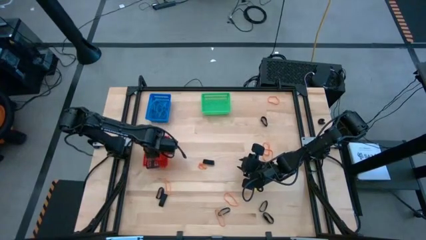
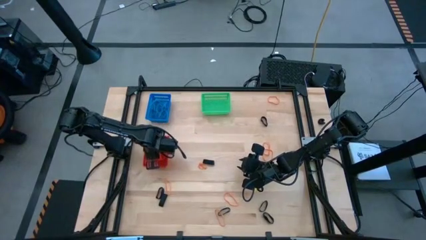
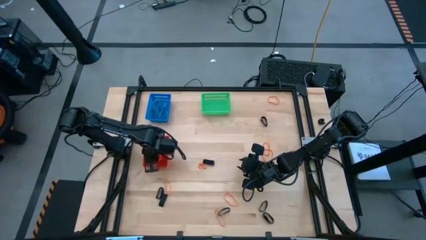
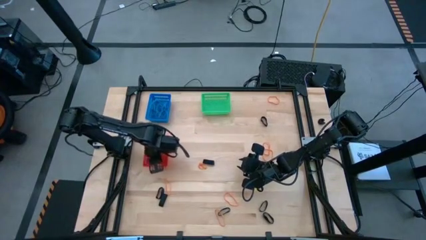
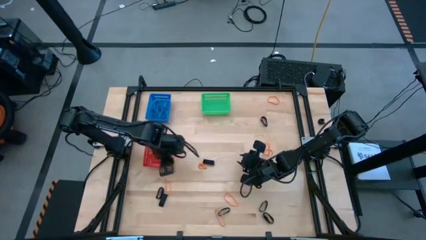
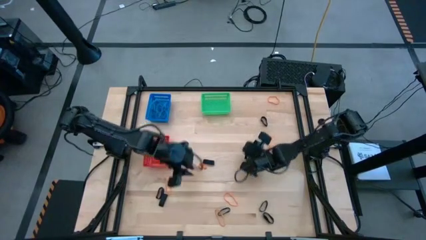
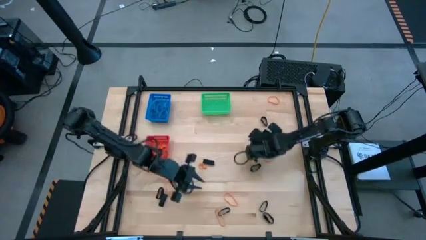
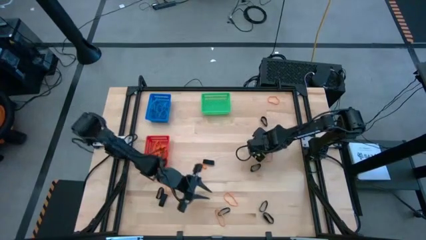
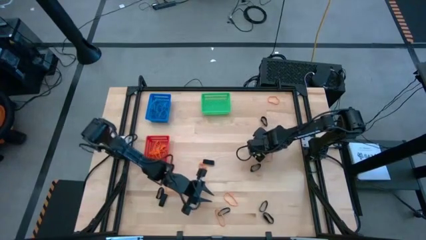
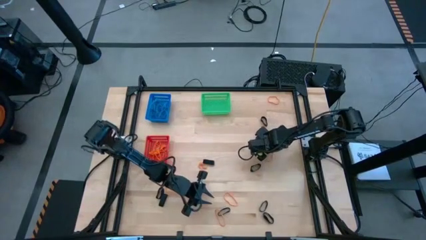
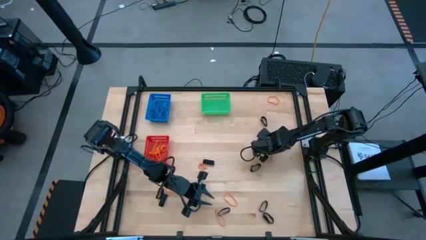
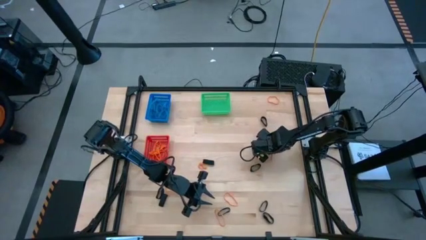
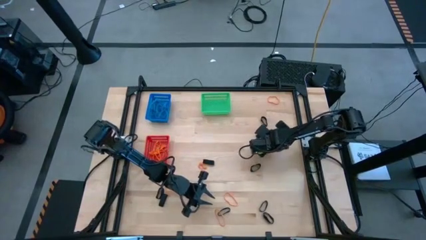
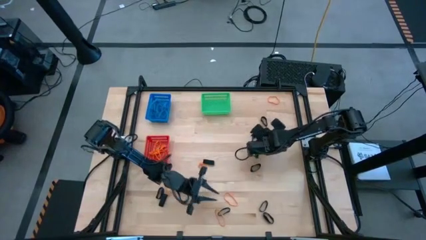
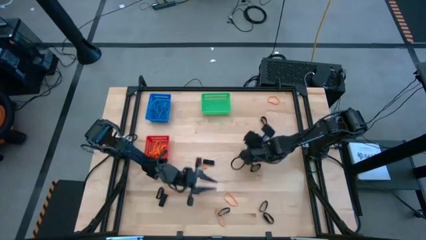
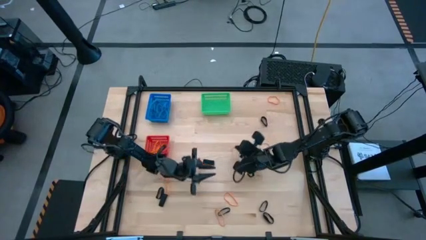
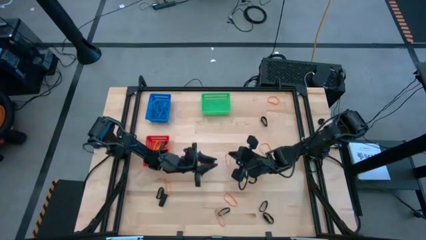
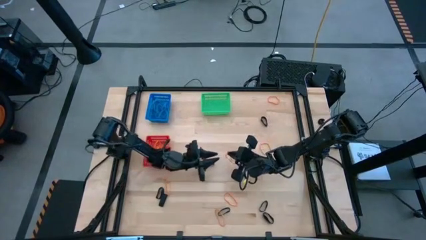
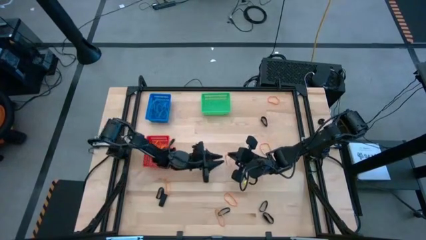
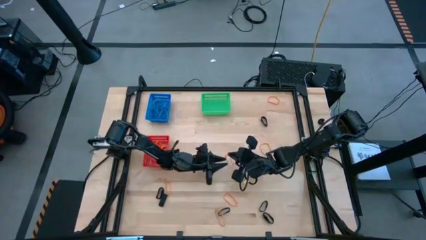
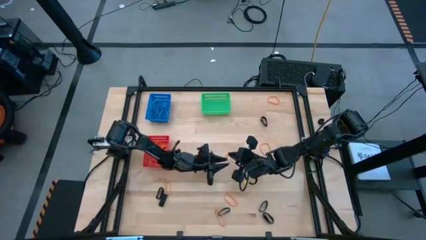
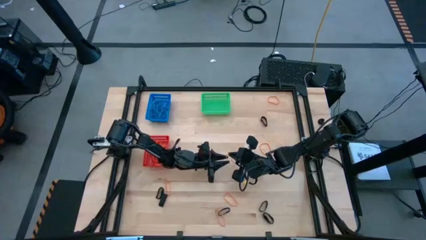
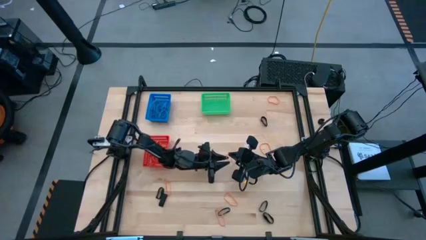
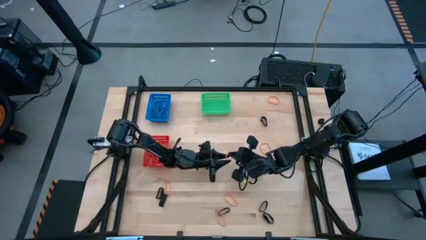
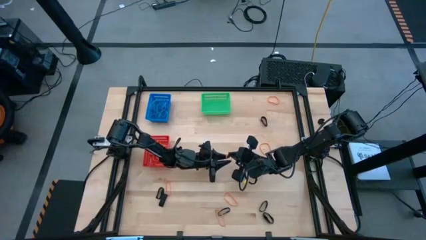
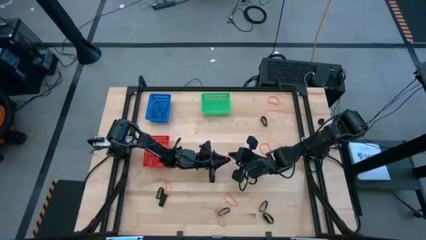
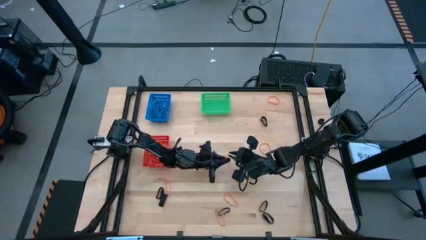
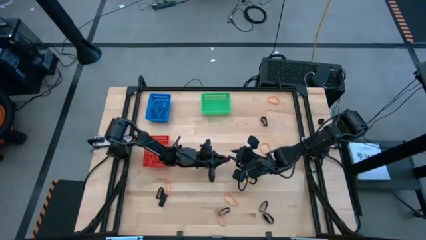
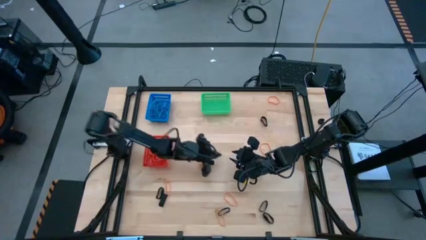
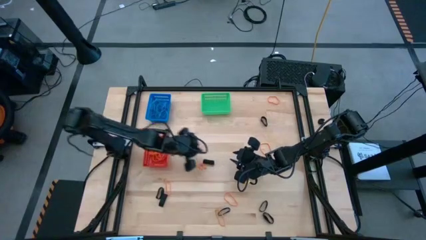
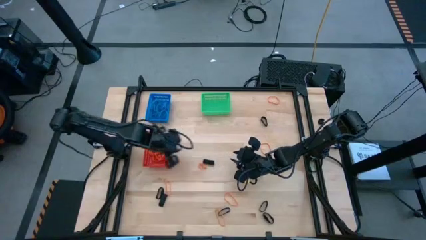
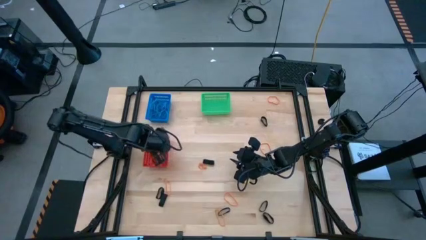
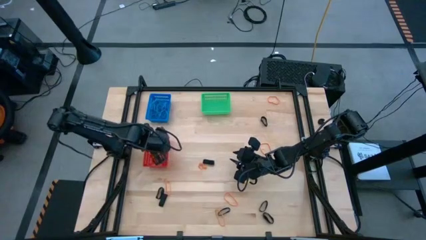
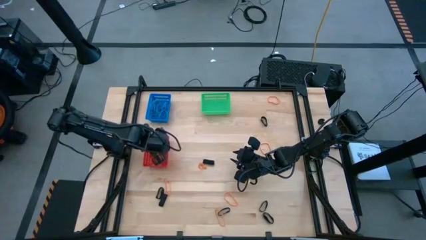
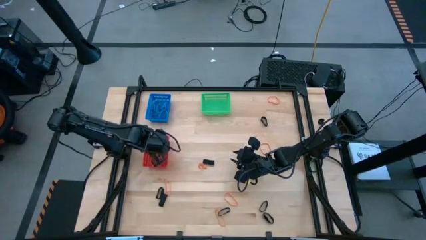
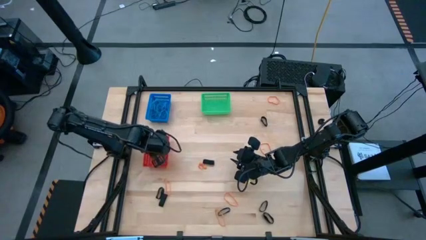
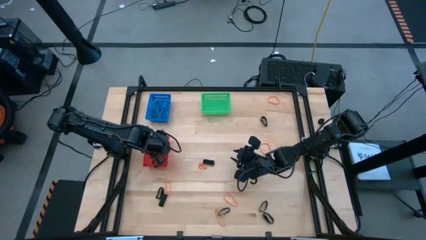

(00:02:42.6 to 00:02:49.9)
Task: Sort rubber bands into baskets
Put the orange rubber band into the red bin

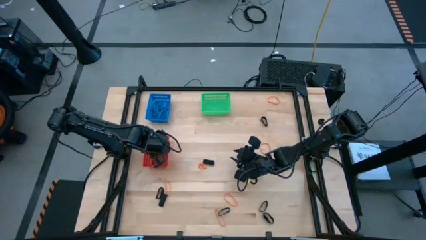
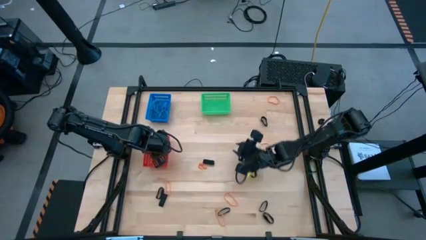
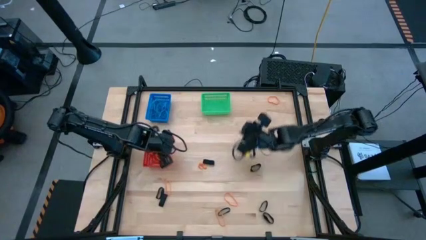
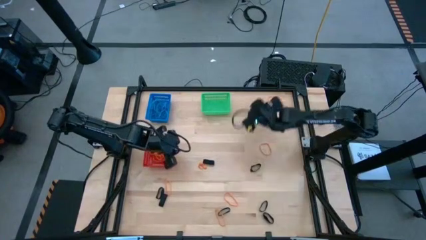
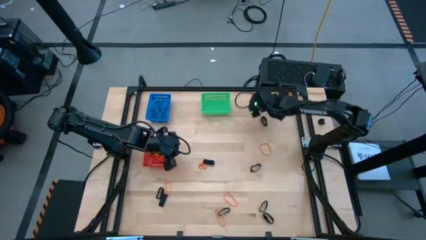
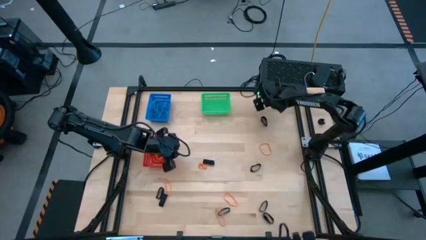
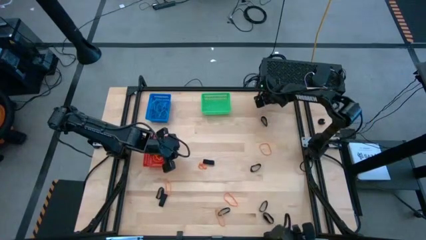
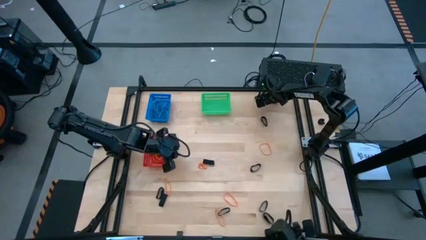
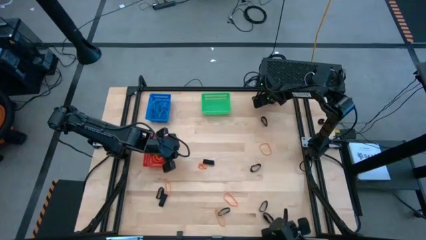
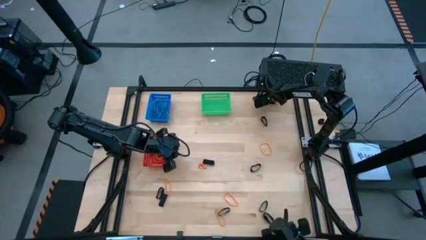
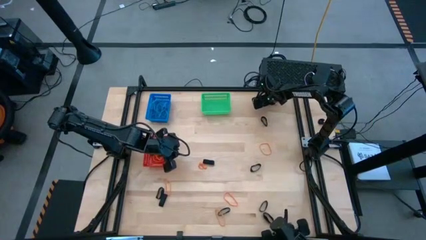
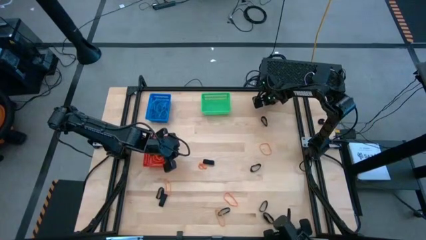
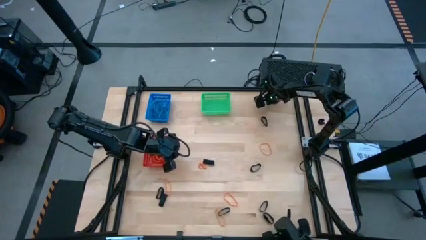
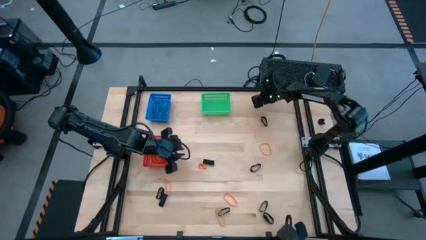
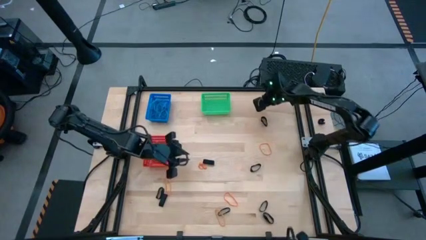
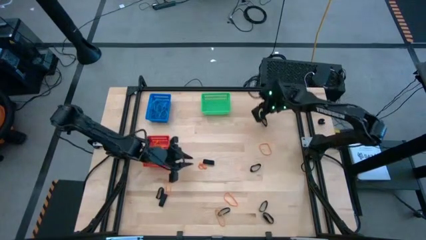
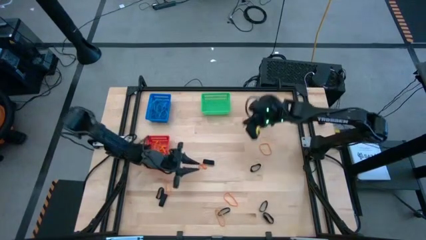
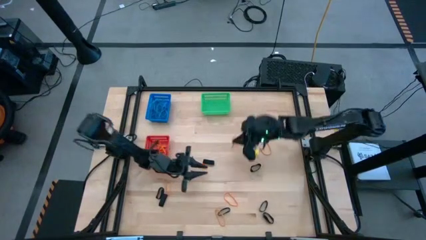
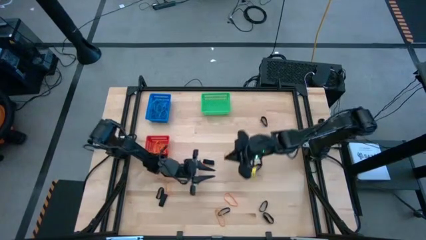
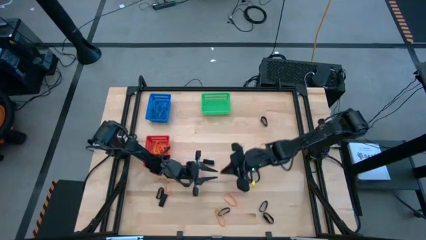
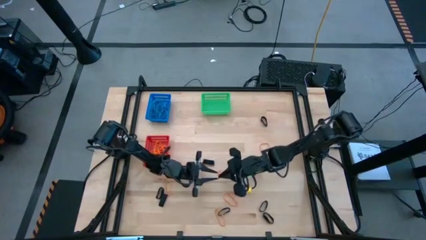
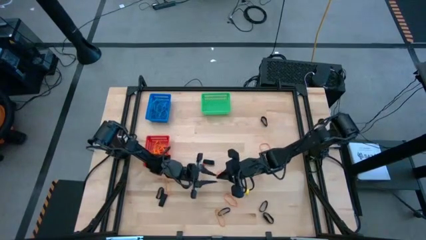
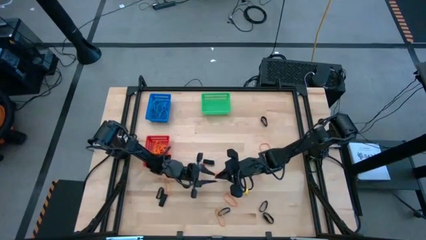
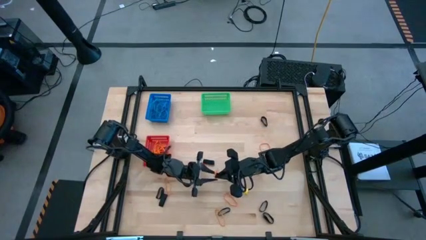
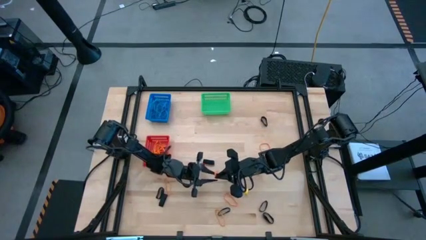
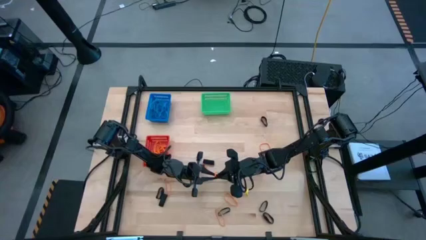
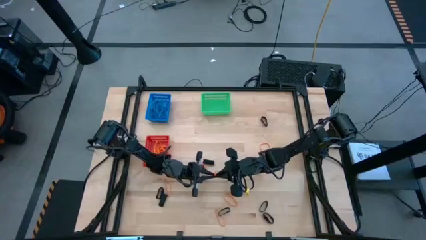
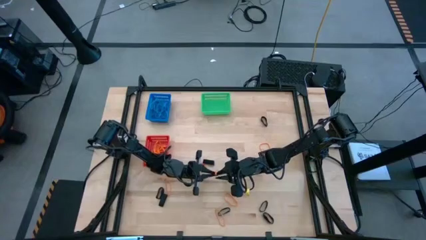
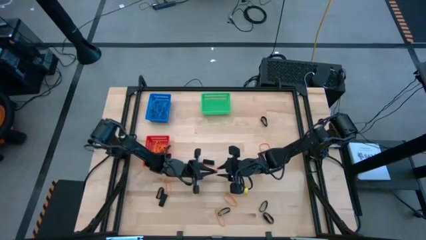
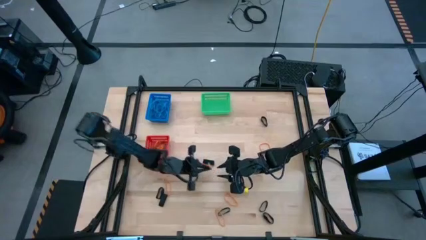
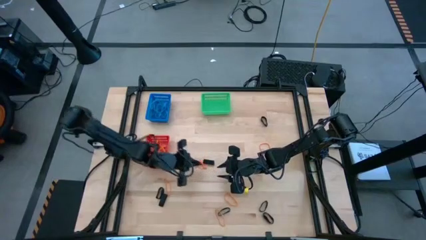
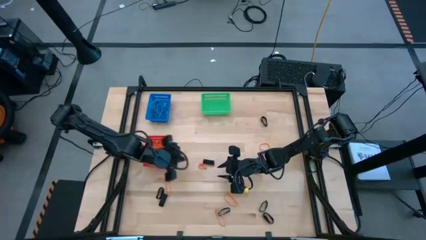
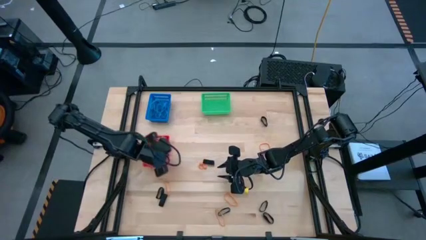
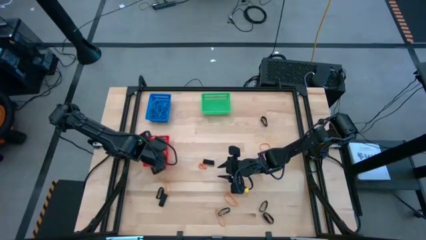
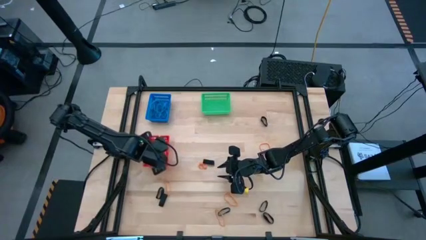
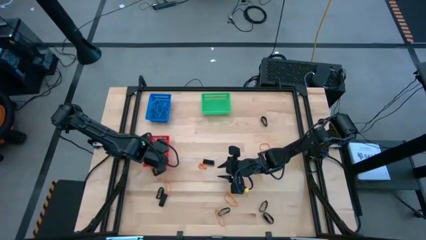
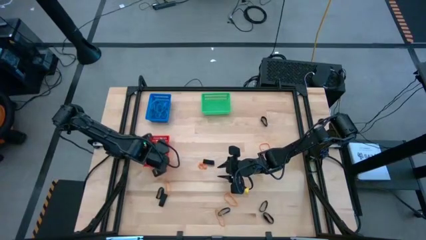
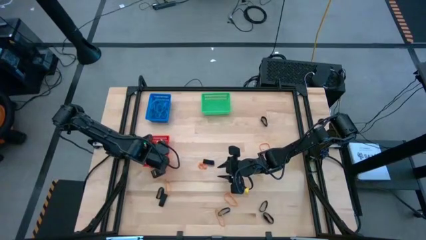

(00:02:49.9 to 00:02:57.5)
Put the orange rubber band into the red bin

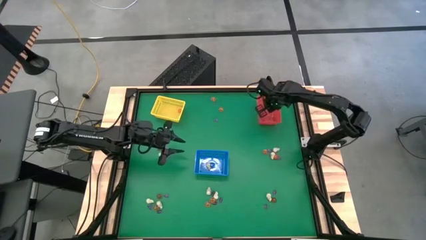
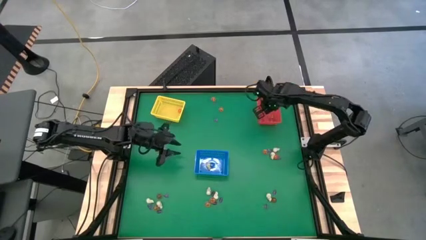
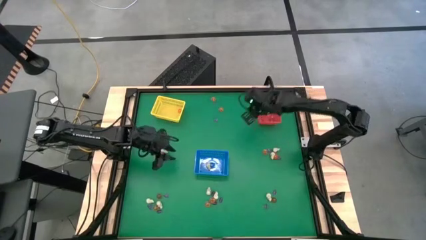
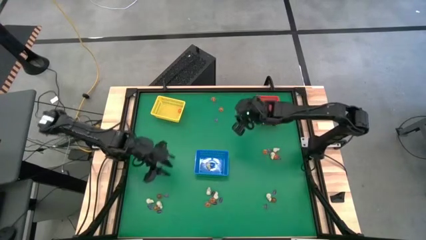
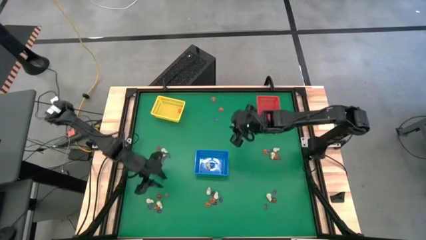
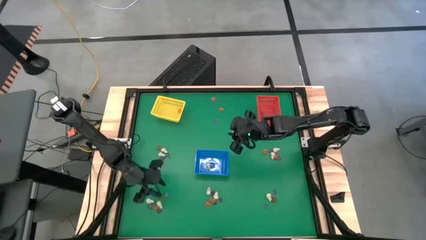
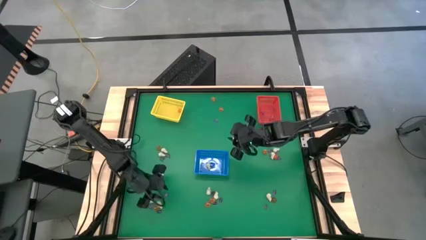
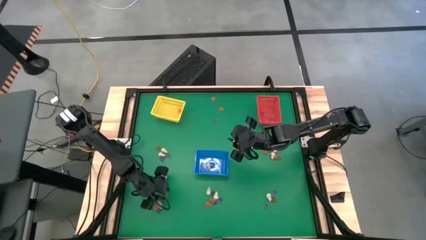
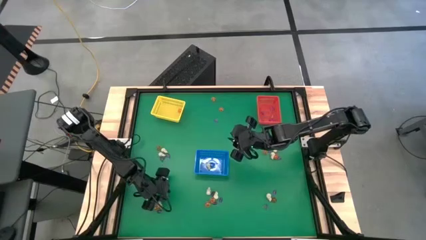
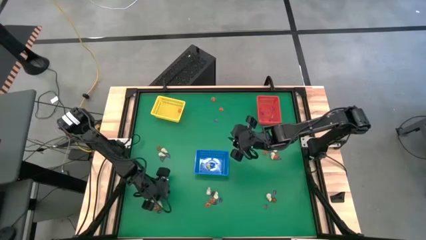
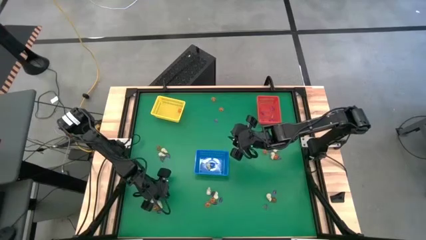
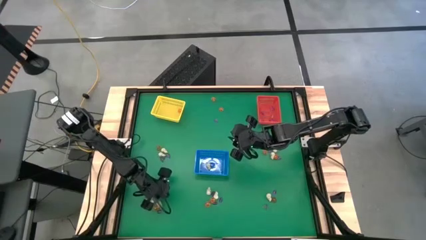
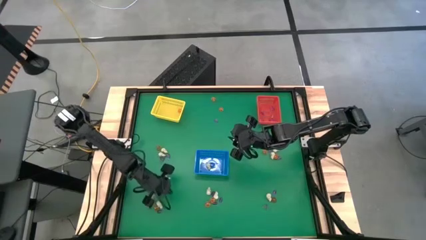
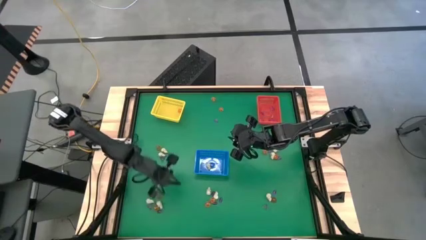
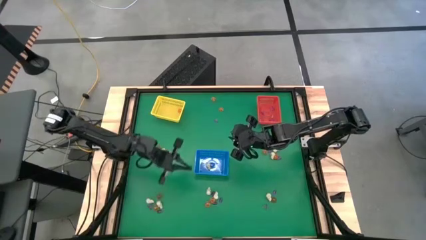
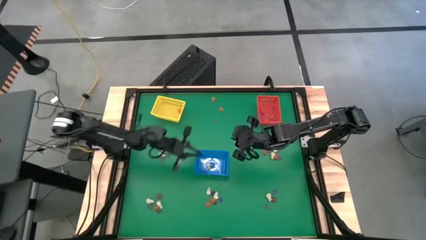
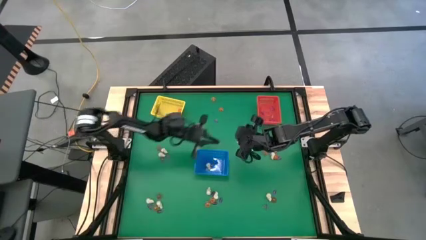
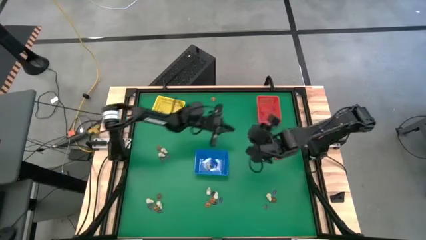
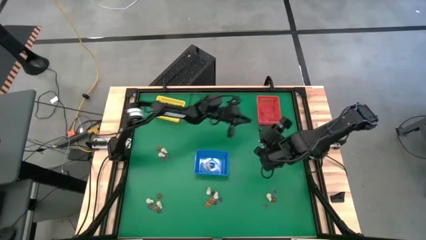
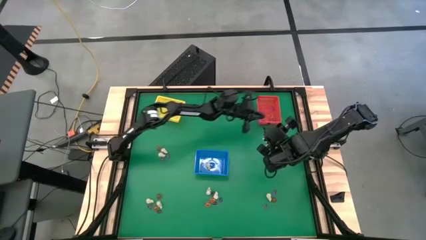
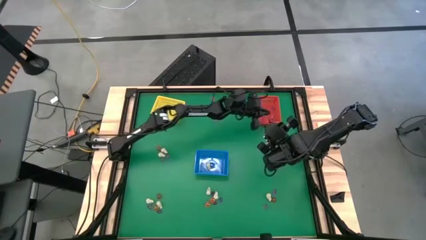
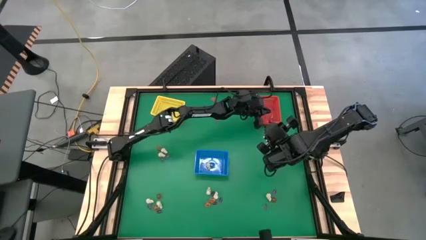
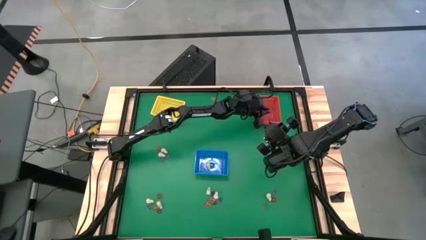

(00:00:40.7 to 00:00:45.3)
Task: Sort Halloween decoration
Put the purple witch hat toy into the red bin
